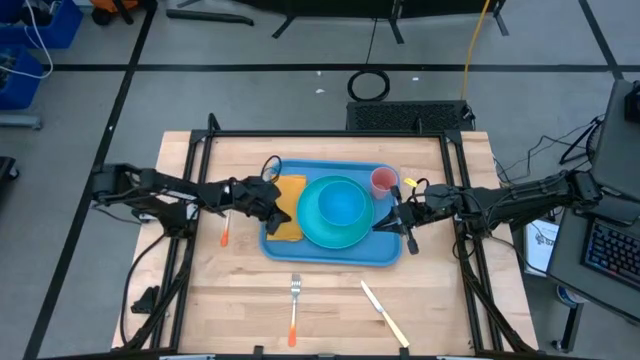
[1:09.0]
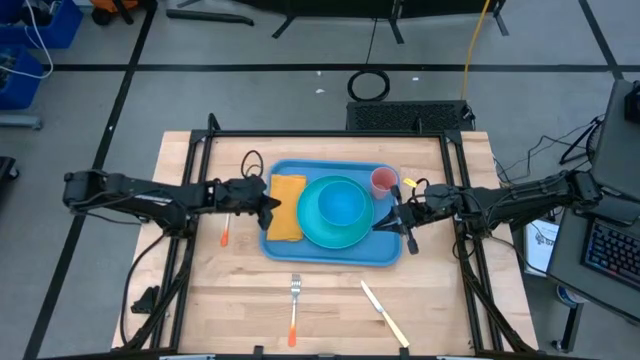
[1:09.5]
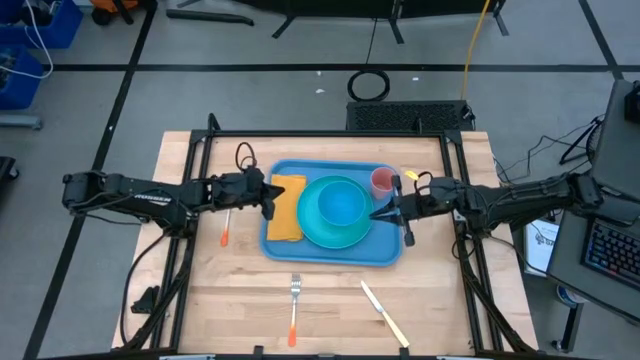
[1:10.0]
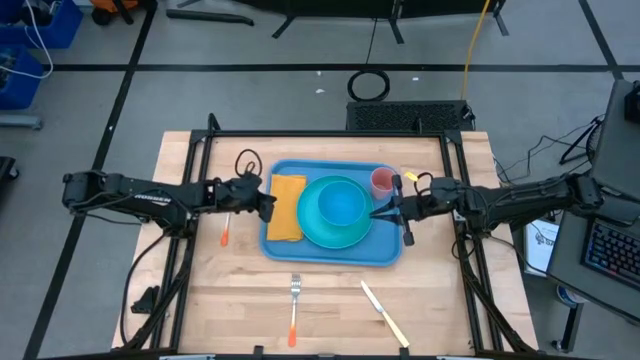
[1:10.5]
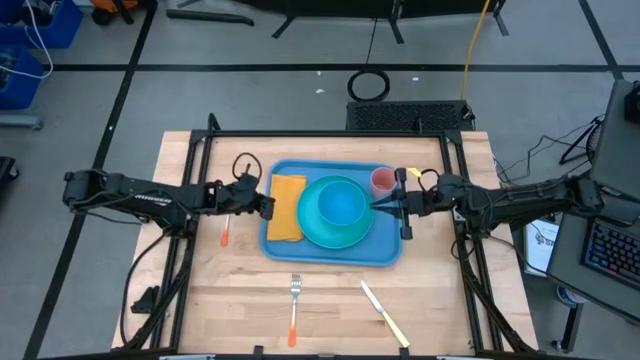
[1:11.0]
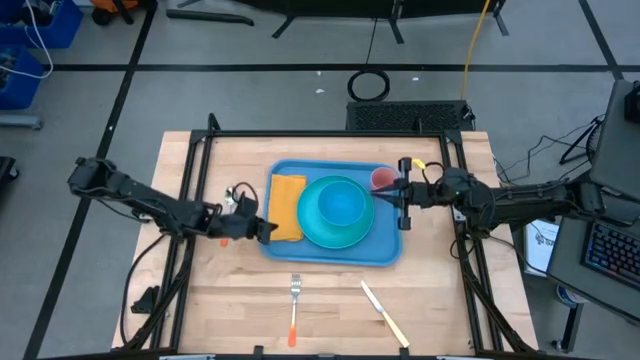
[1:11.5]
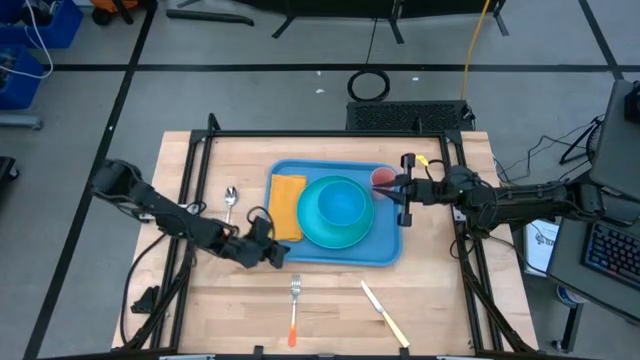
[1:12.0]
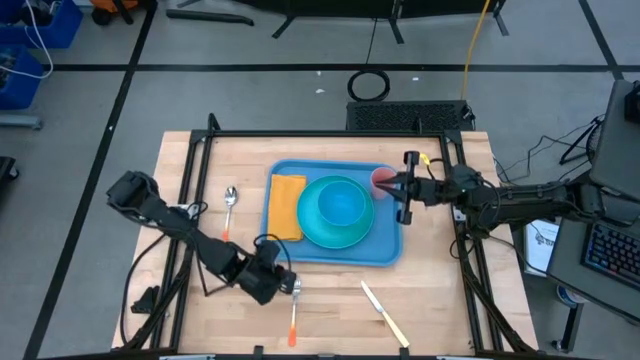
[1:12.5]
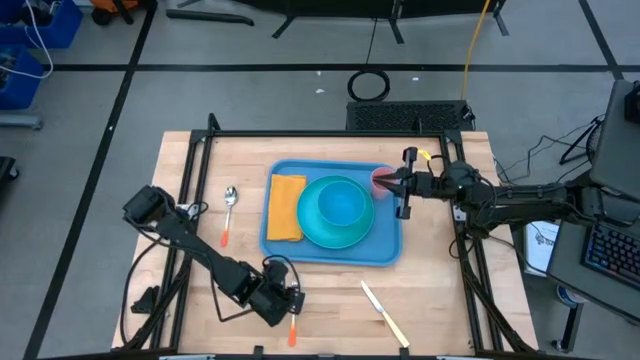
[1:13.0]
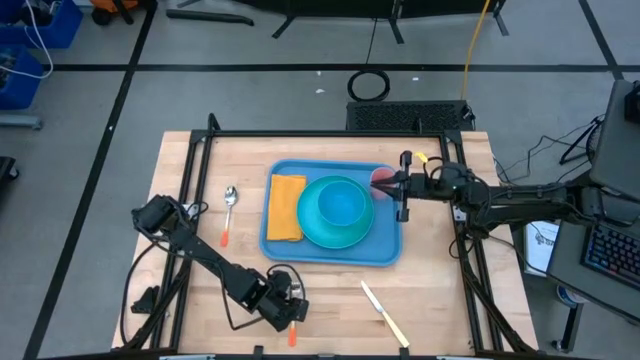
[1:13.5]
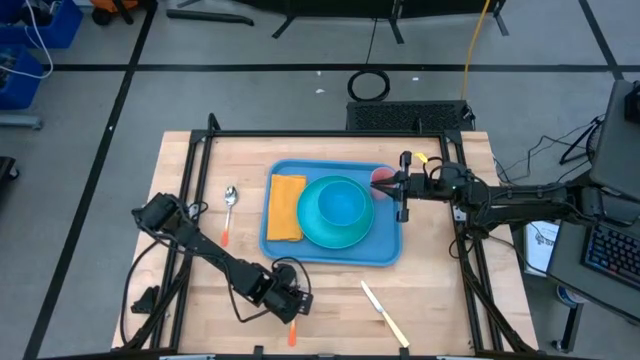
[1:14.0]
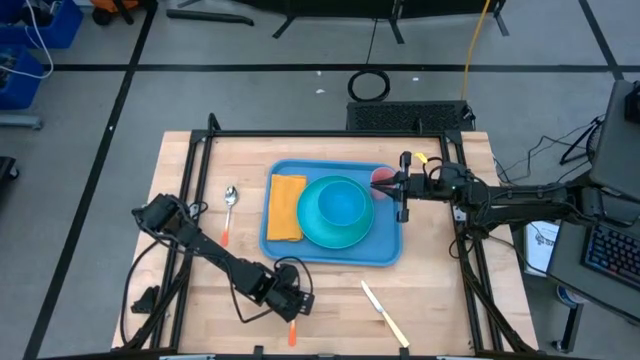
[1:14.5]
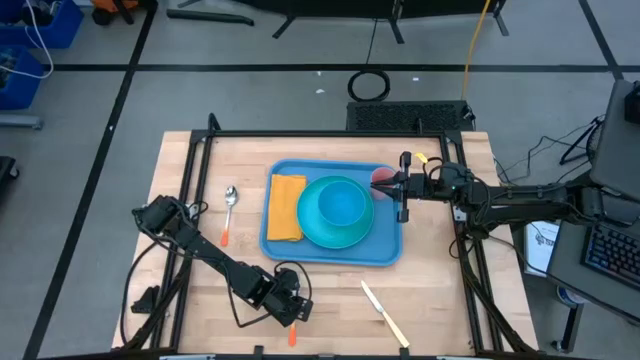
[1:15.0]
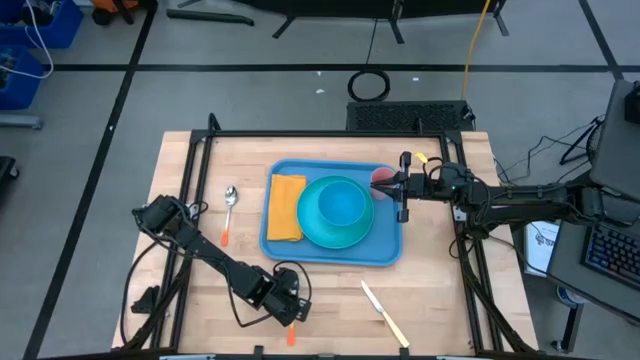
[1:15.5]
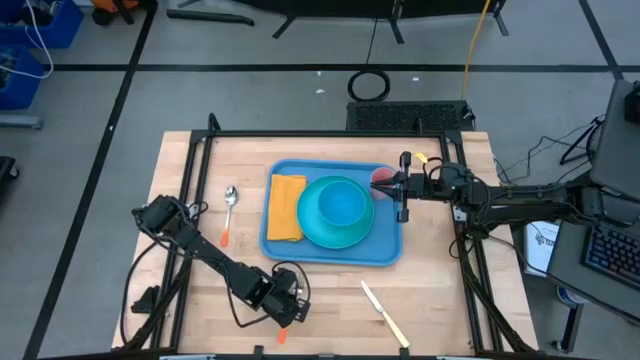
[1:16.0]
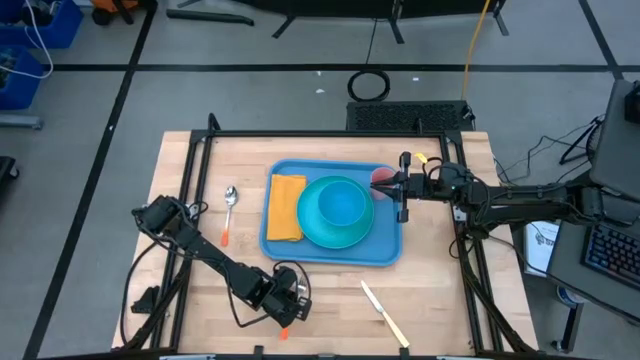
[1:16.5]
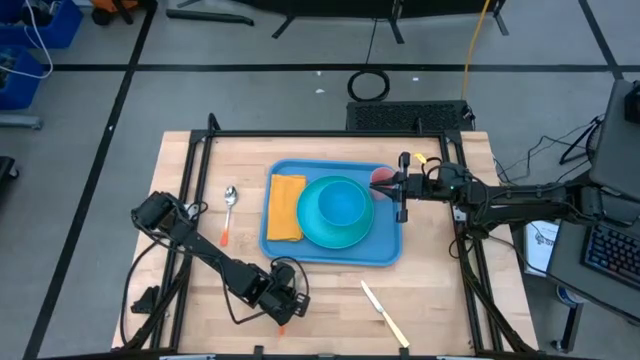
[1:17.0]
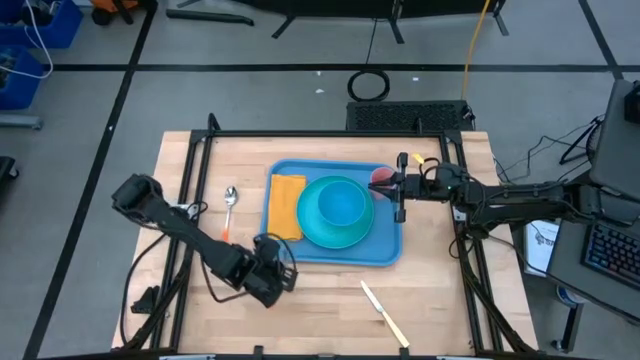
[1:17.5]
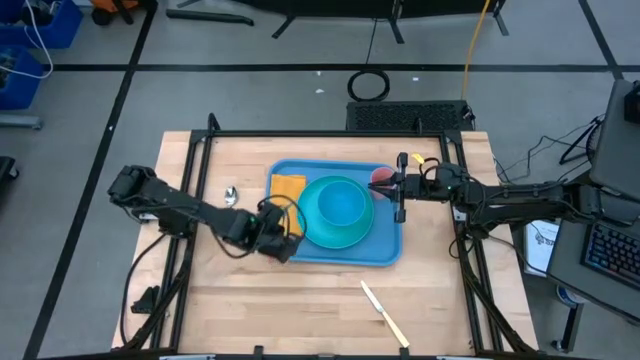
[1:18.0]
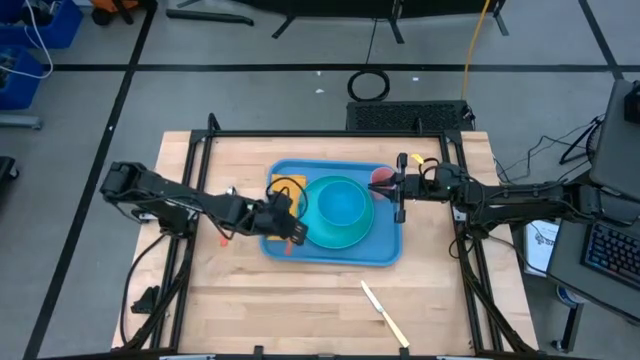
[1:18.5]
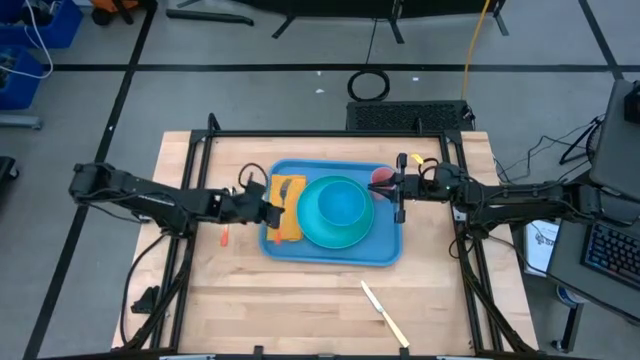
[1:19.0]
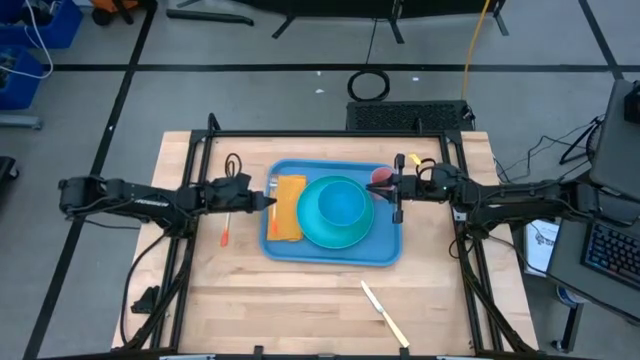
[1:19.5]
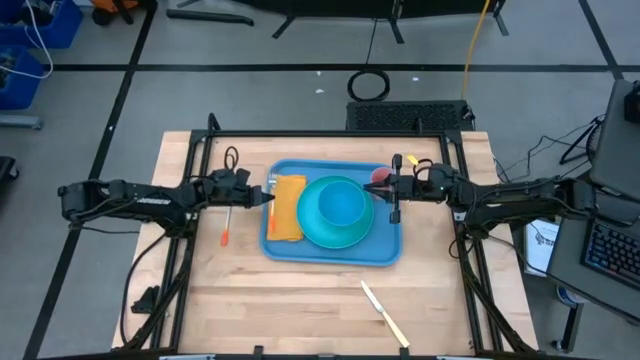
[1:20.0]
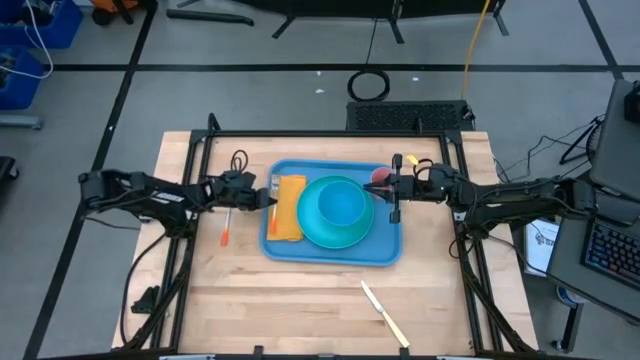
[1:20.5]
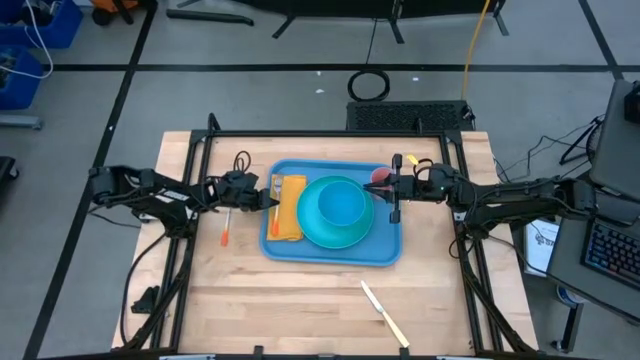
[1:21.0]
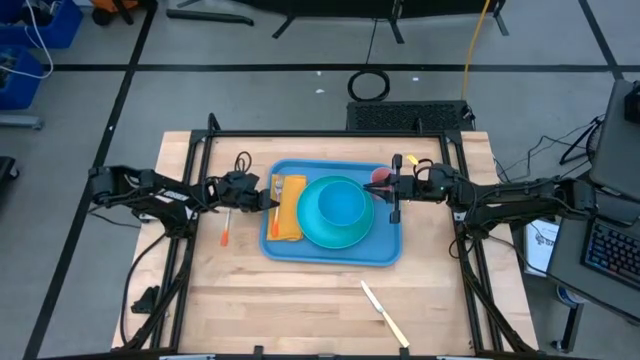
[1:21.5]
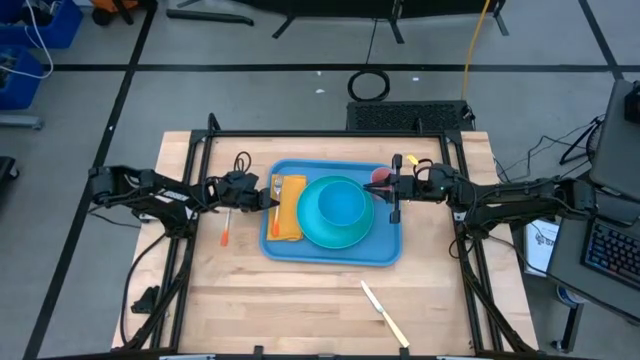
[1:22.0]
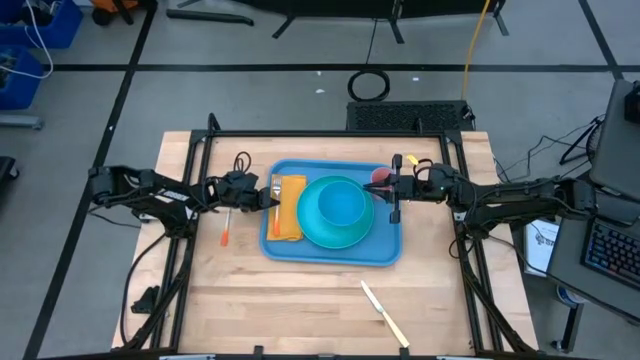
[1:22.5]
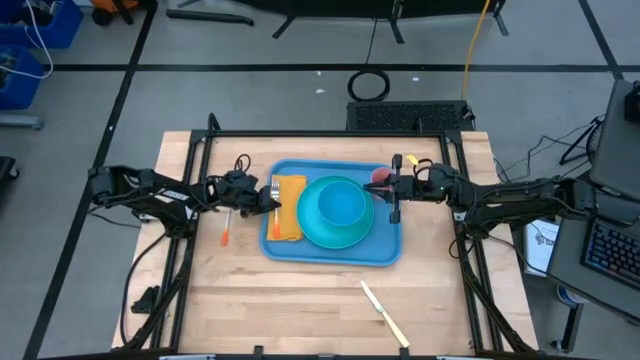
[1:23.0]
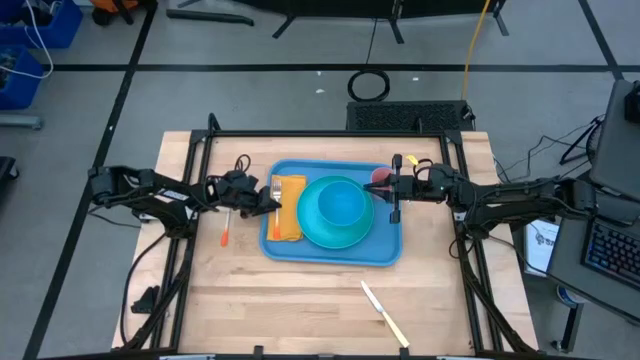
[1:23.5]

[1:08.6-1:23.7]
Task: Set up tray
Put the orange fork on the yellow napkin on the blue serving tray

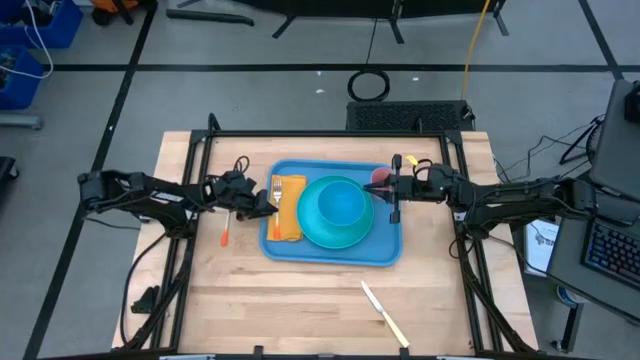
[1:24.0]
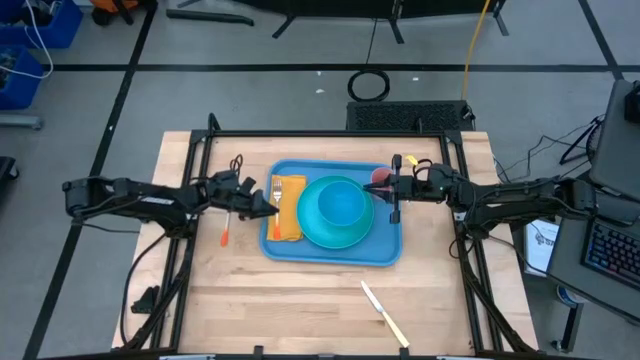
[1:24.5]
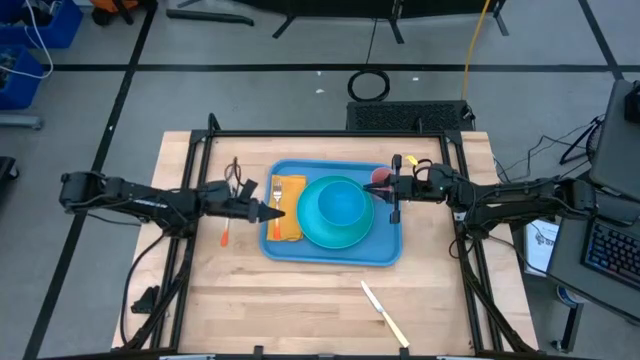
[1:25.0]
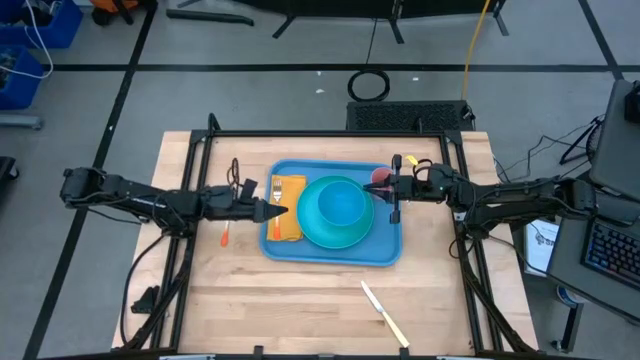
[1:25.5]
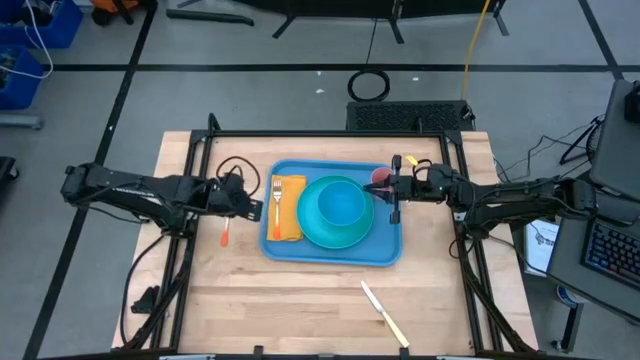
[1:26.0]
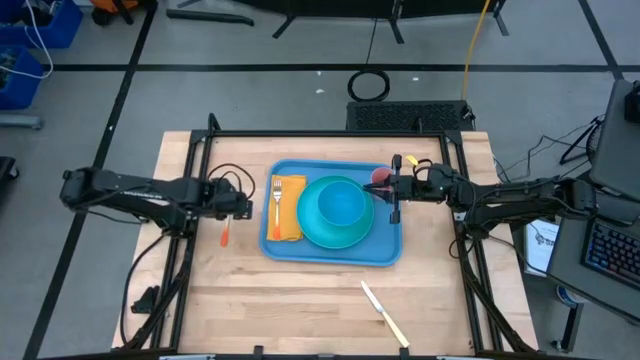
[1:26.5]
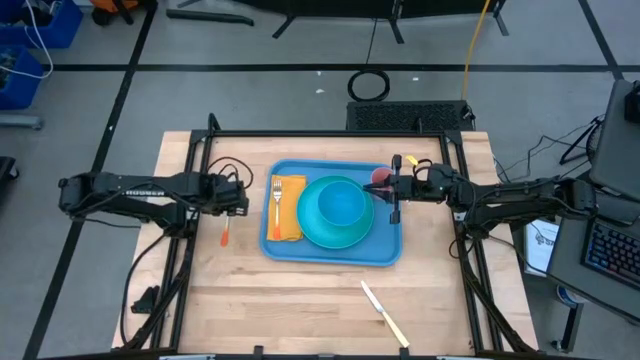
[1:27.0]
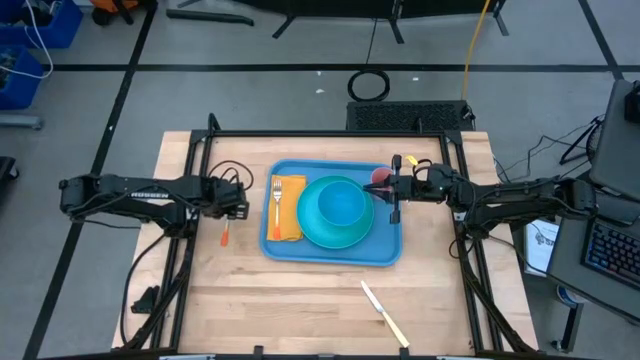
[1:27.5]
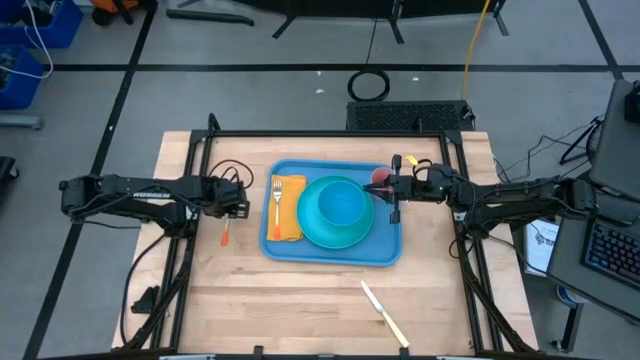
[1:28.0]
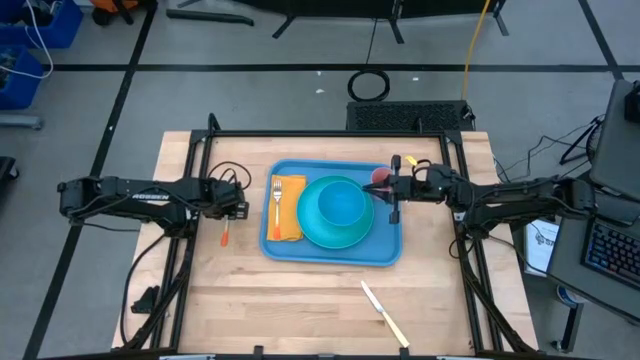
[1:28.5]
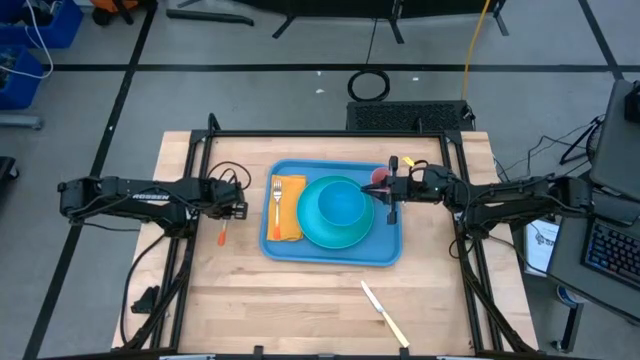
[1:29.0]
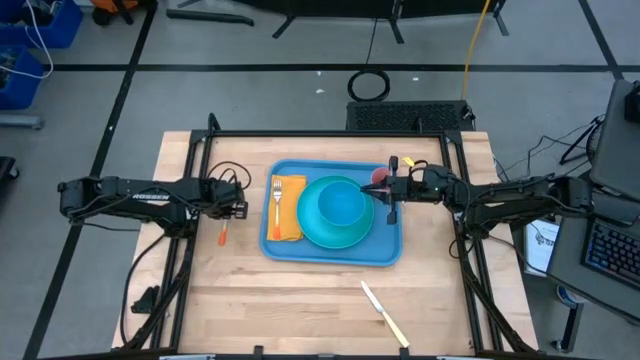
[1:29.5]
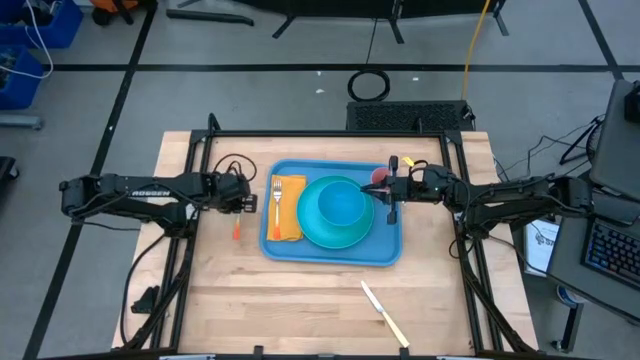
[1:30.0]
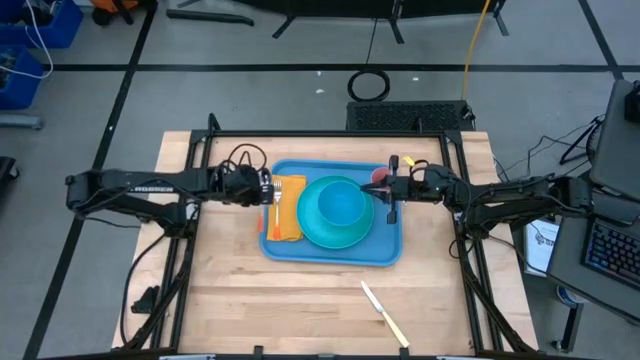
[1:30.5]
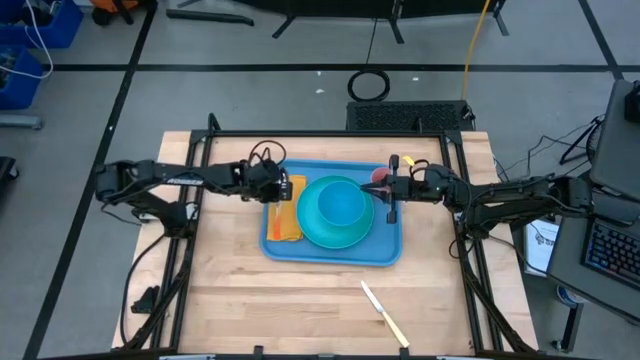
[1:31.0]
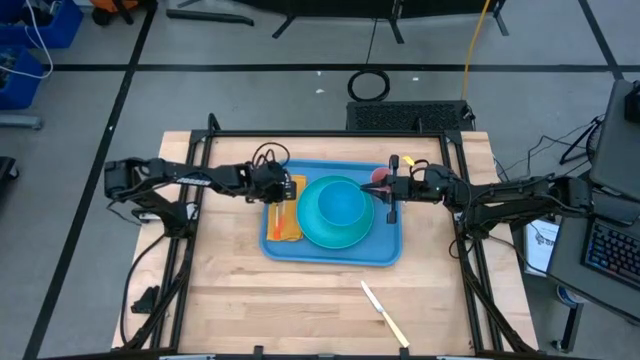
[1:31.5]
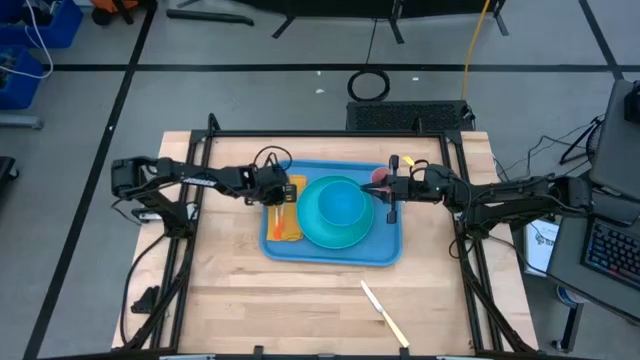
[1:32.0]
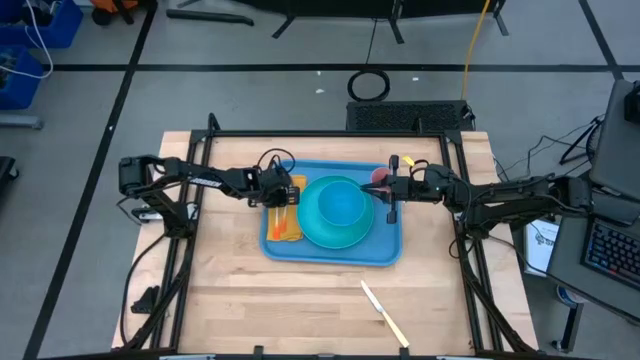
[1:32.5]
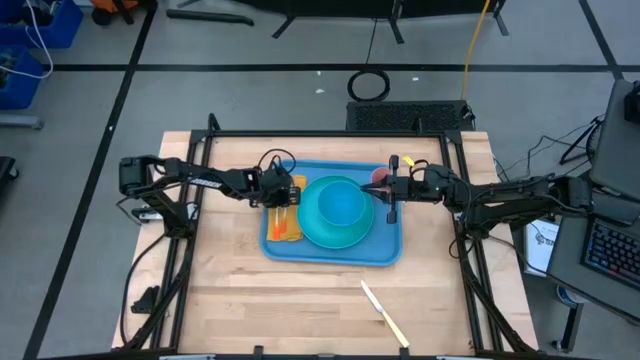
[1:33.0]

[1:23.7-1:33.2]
Put the orange spoon to the right of the orange fork on the yellow napkin on the blue serving tray
